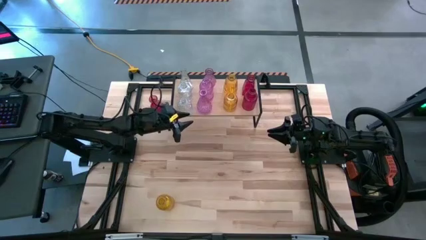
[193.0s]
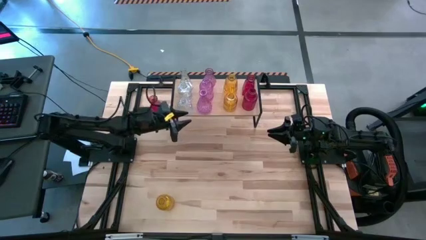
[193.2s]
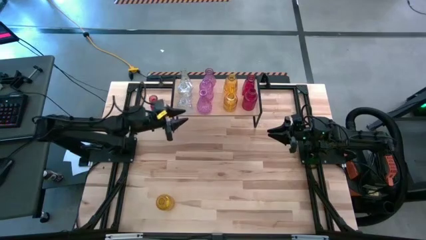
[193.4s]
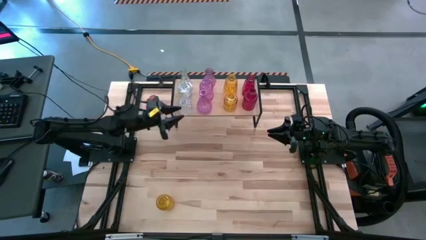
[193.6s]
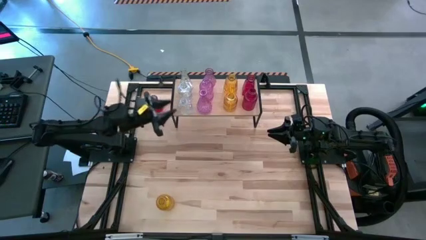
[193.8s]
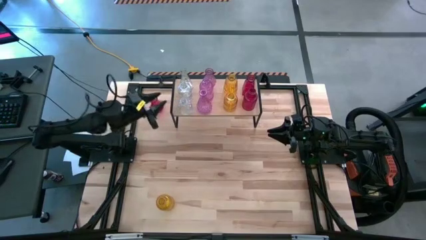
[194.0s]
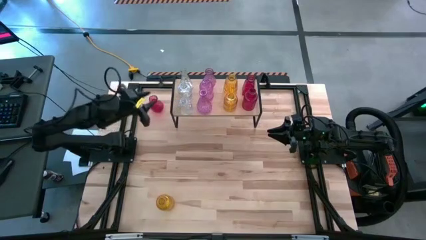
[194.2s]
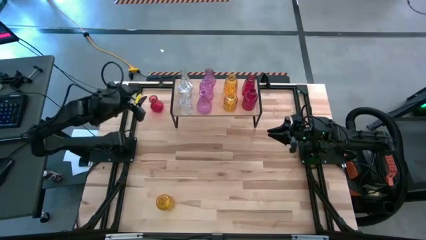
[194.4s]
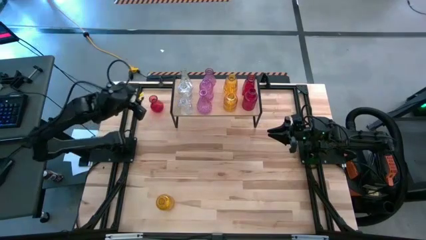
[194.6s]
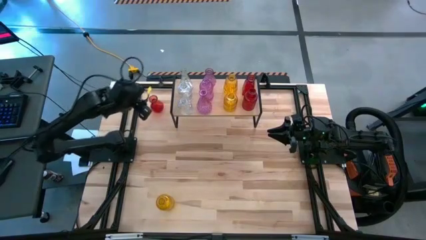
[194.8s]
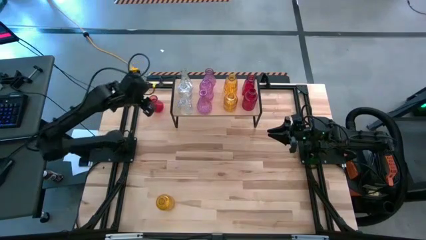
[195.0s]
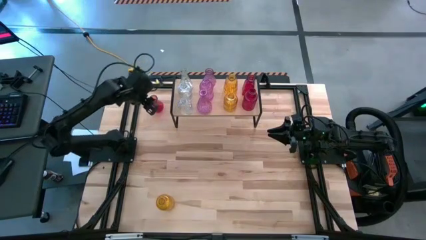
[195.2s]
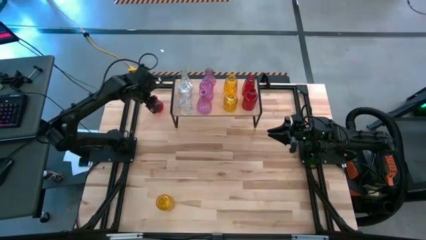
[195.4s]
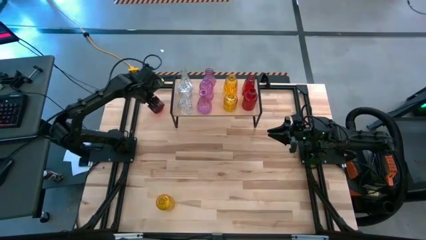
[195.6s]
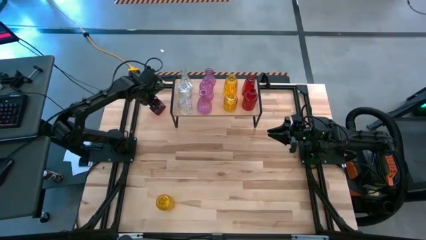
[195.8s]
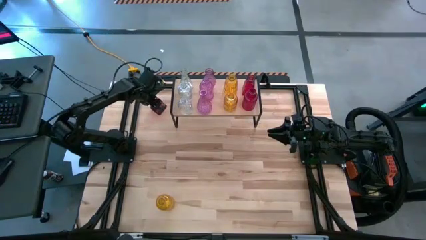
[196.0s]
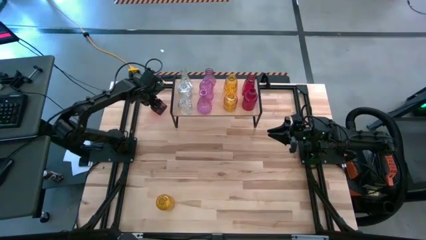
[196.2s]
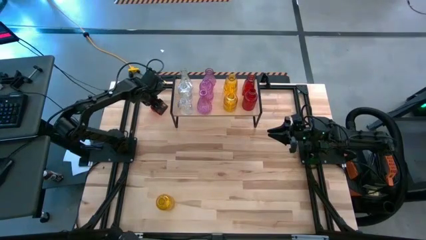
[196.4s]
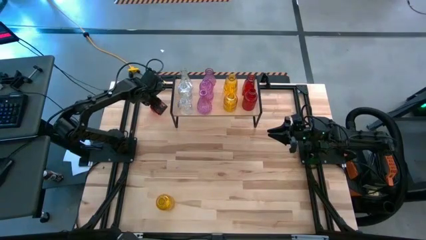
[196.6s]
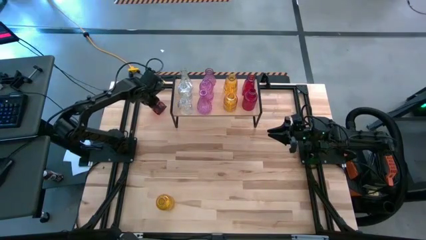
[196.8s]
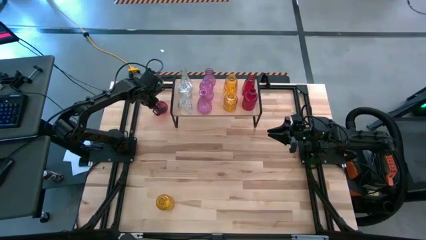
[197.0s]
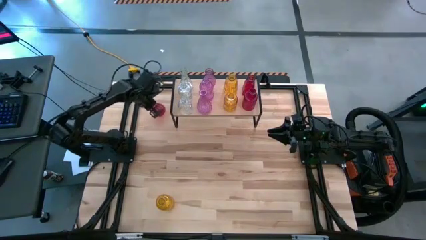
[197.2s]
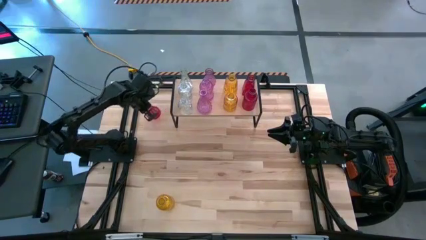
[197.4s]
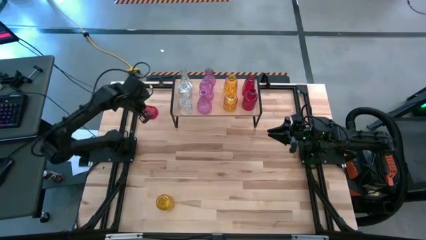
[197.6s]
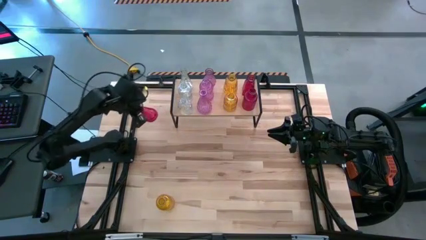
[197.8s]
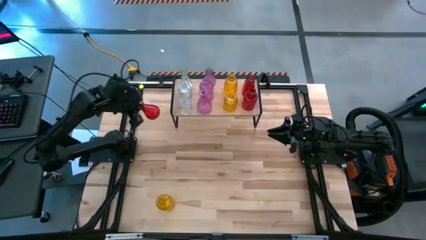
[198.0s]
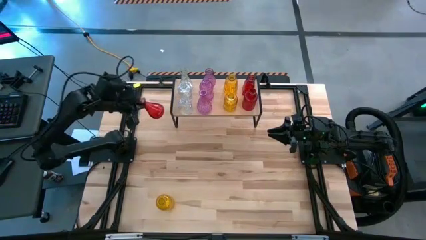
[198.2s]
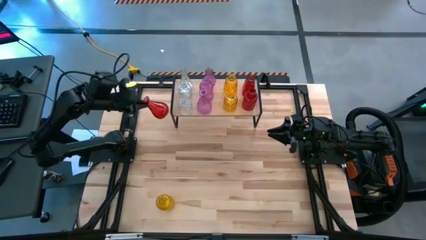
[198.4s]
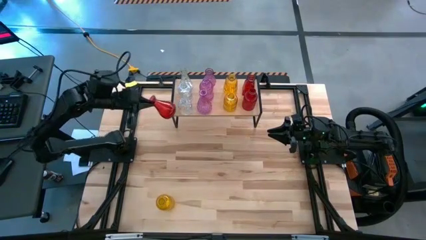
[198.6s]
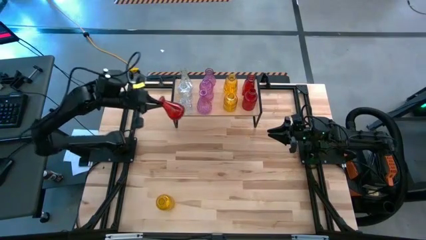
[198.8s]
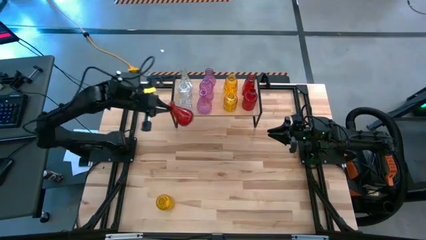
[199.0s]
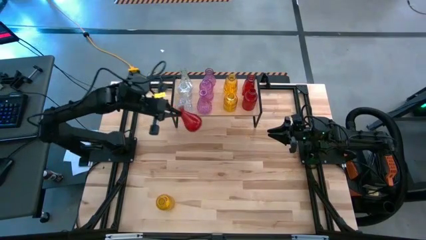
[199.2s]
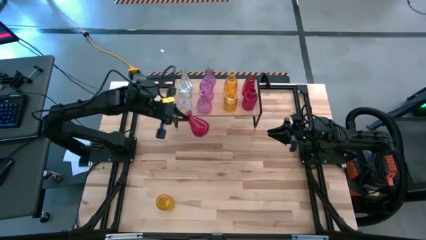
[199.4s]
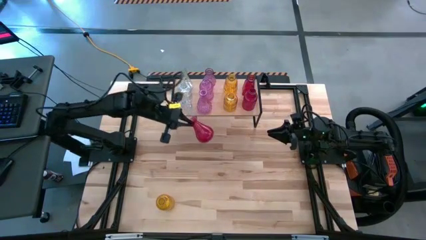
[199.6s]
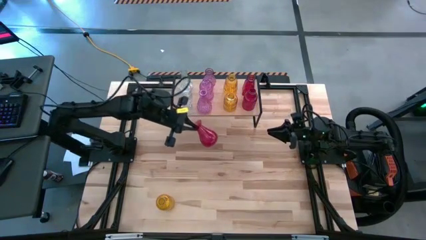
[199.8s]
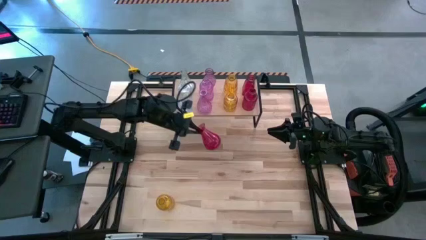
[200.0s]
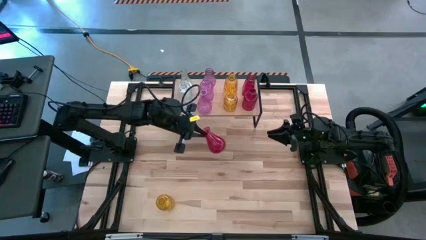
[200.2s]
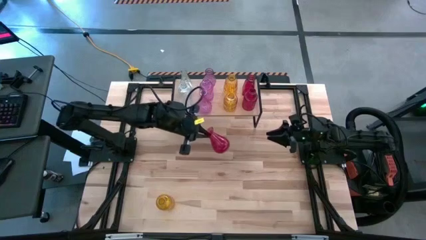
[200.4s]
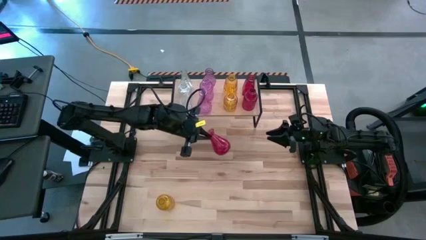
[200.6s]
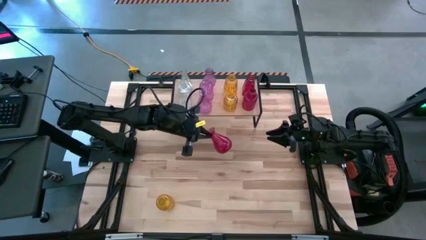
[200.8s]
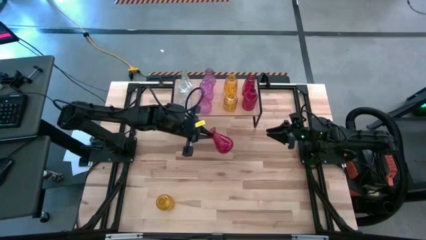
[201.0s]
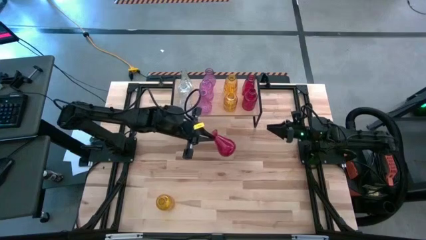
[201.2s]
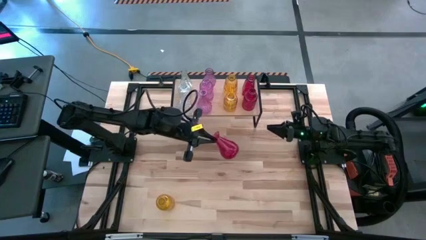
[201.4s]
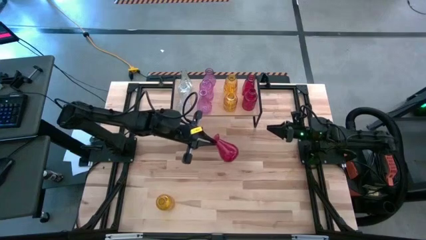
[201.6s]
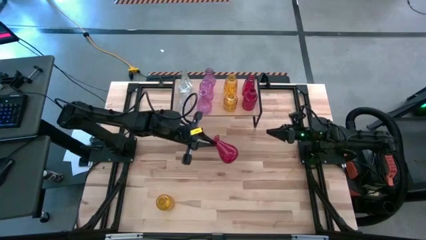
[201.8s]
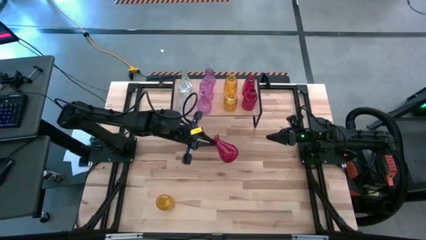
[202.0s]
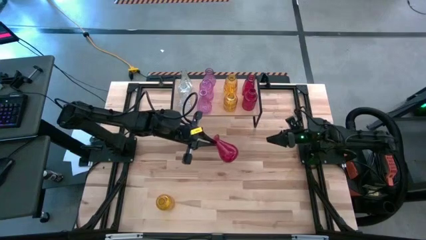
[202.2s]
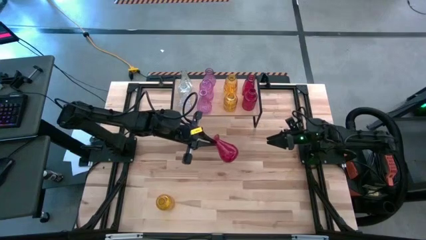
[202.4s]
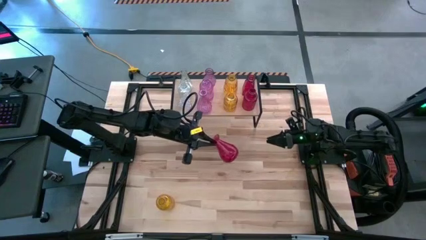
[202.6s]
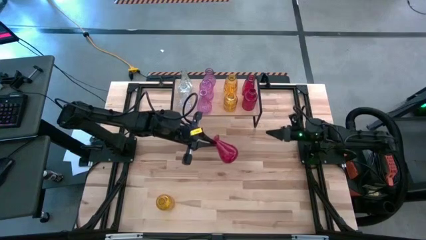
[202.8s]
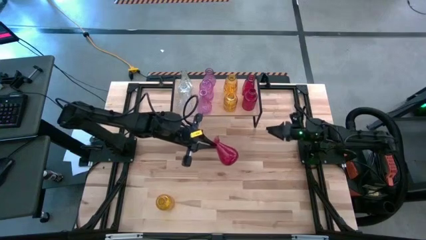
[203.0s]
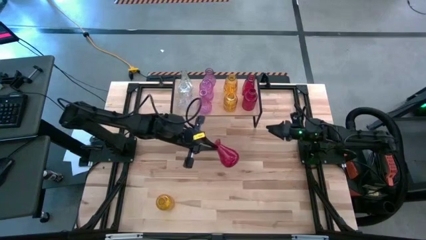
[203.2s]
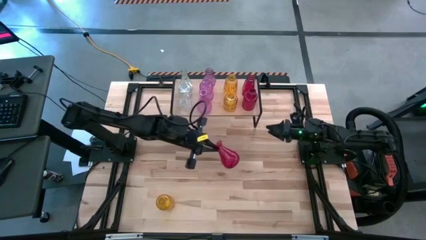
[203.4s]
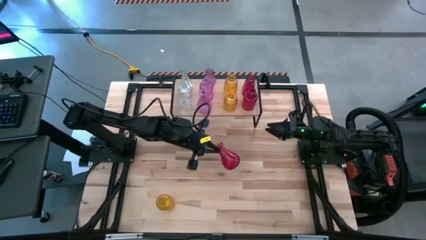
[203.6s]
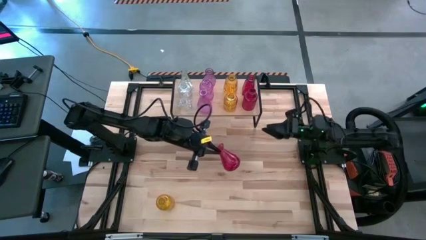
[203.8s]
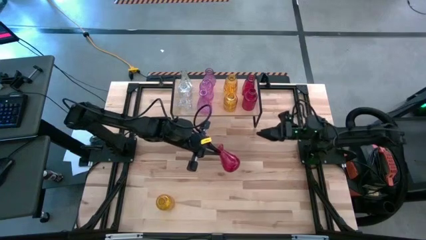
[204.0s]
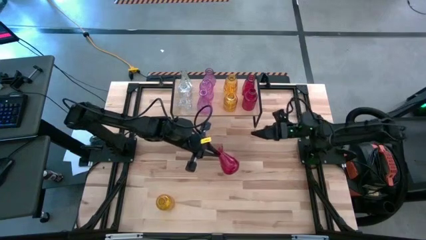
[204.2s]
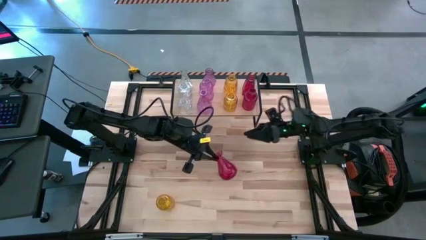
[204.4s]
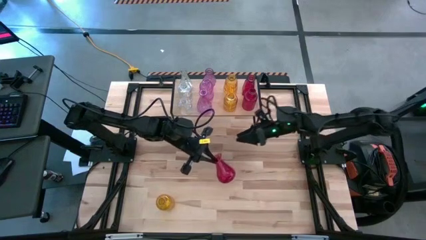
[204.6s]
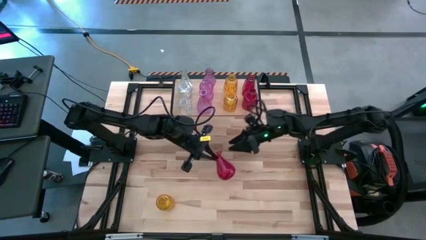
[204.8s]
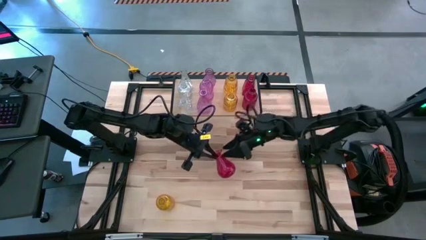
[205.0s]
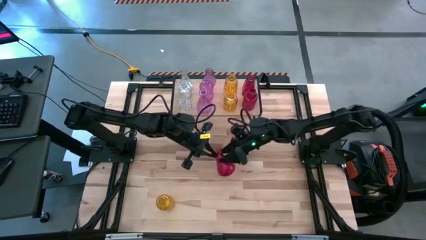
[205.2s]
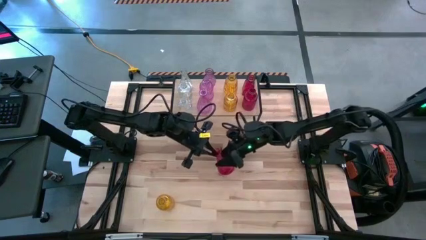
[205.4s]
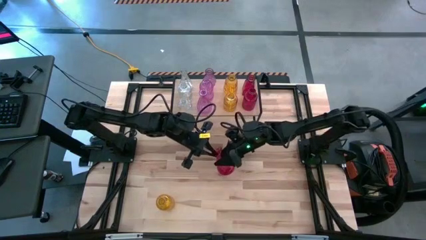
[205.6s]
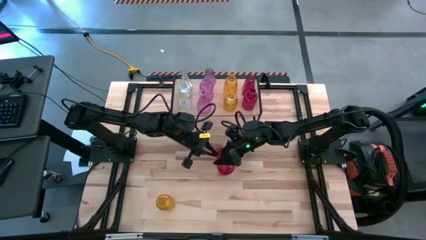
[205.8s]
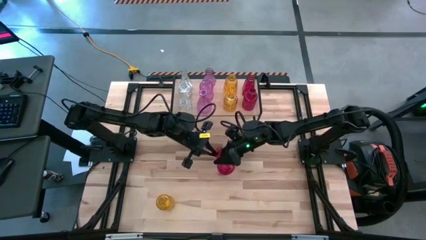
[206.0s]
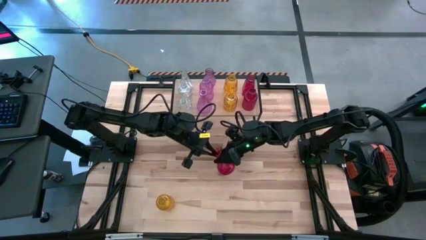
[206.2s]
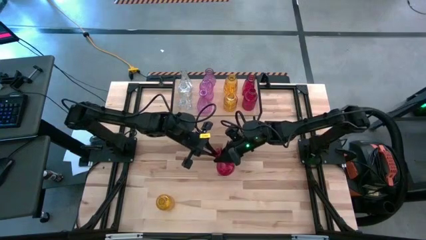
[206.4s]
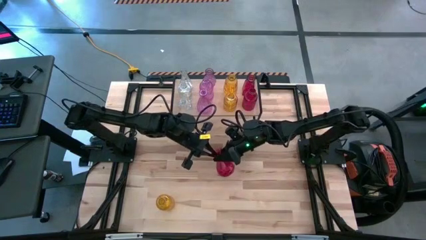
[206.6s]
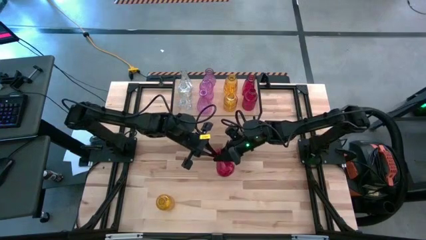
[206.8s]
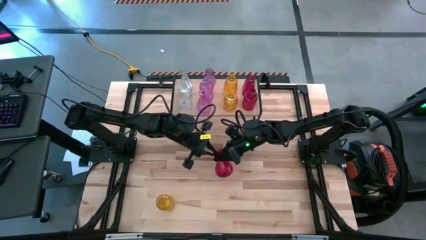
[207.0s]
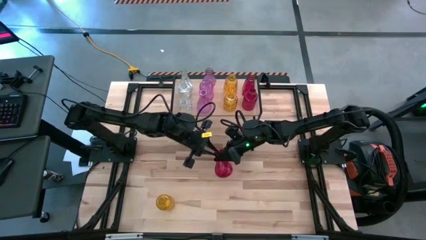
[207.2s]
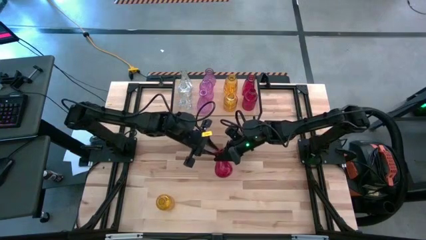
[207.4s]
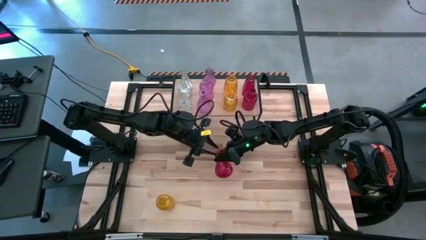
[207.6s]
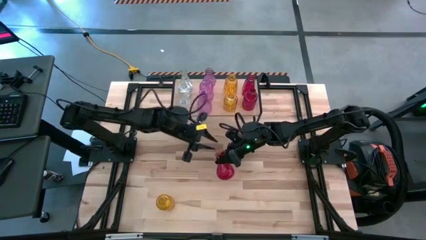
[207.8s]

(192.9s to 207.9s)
Task: sort vases onto shelf
Put the red vase on the shelf aligned with the other red vase

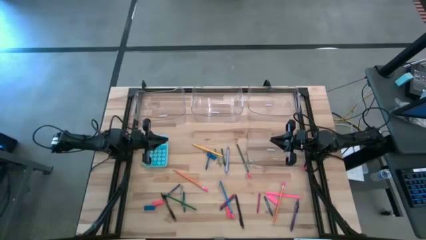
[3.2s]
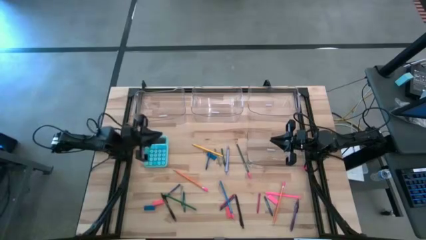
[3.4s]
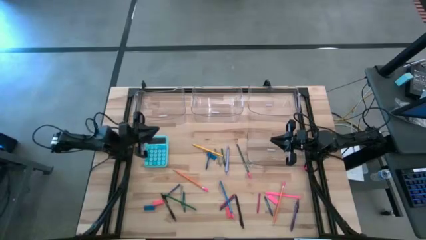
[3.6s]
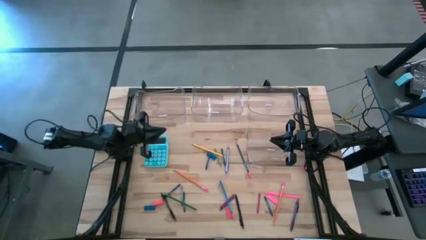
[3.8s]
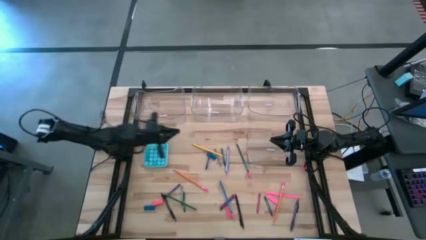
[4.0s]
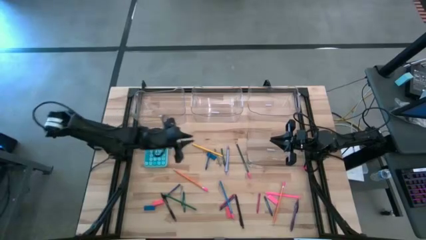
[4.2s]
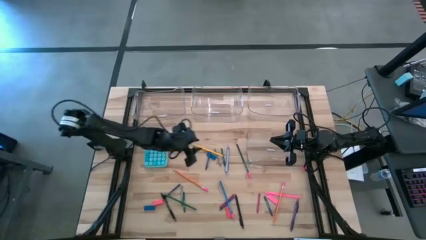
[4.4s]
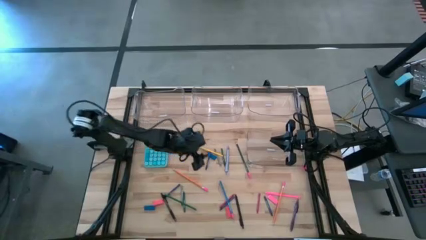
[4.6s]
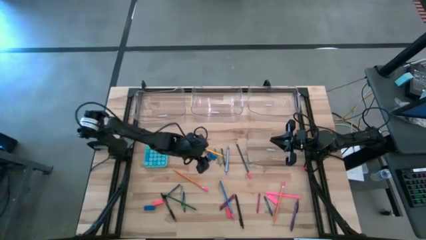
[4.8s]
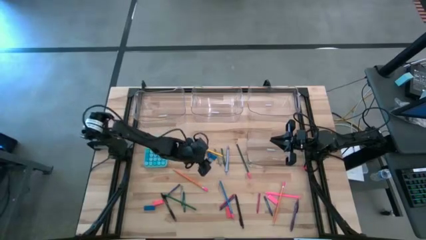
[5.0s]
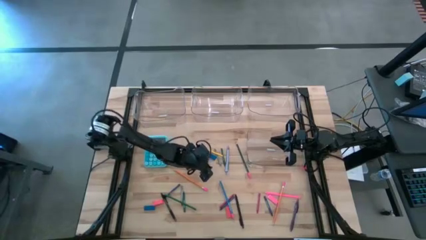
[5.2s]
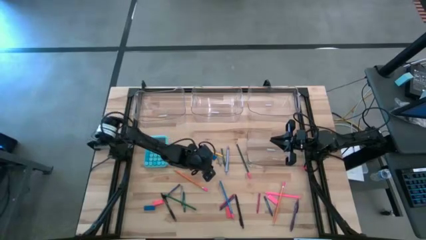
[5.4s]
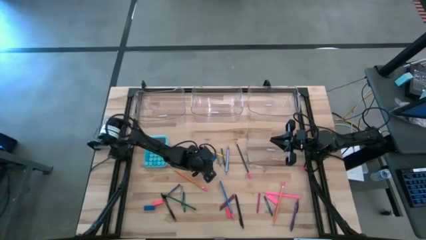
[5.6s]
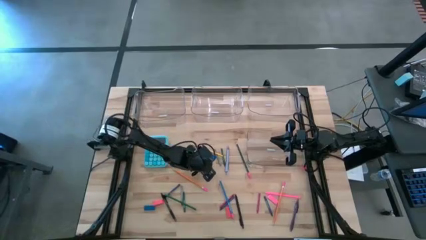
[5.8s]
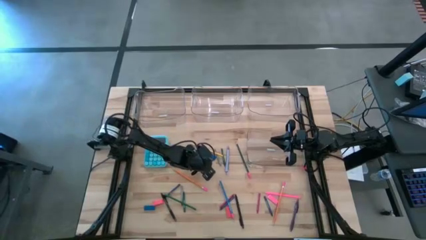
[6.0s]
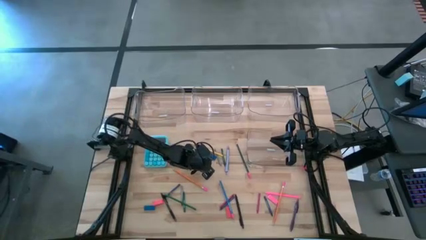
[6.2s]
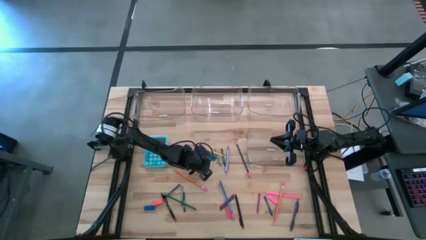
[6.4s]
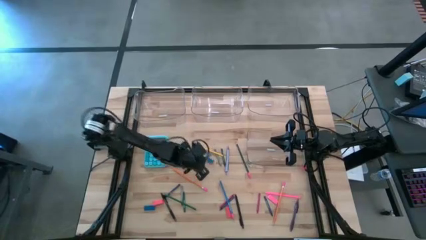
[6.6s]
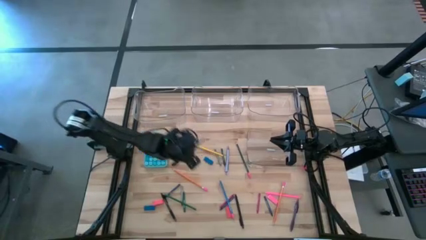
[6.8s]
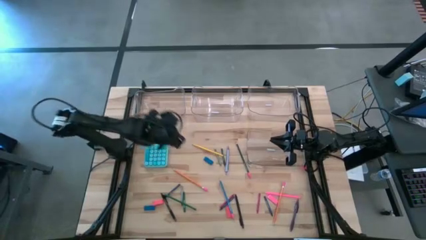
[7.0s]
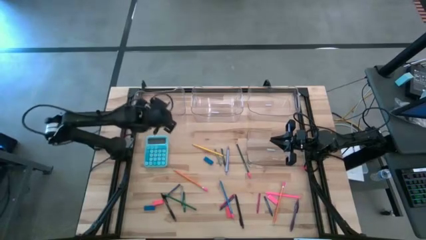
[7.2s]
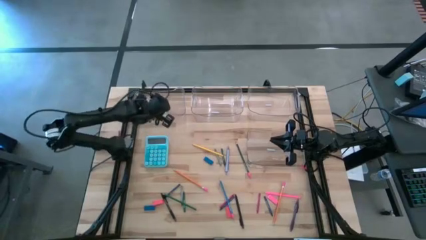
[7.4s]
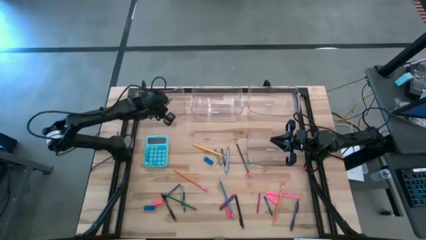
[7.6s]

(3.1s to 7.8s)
Task: Sort crayons/erasers/pens/pencils in bins
Put the blue crayon into the top left transparent bin
